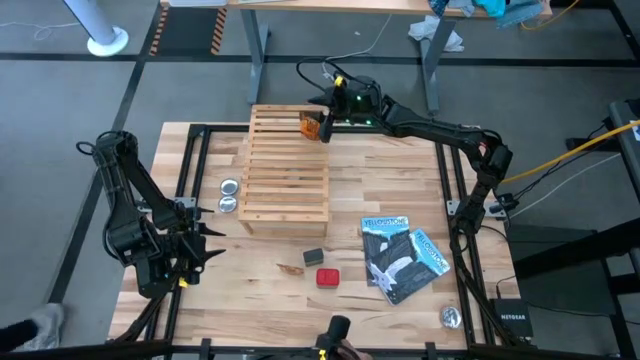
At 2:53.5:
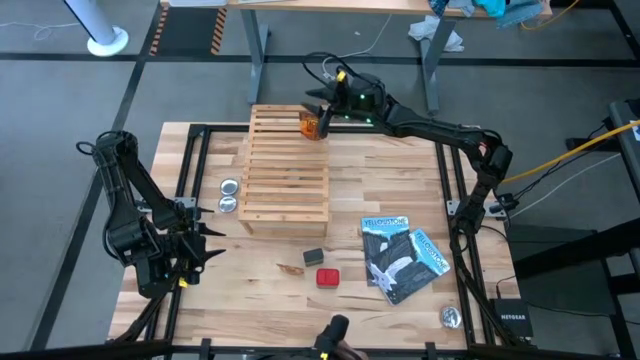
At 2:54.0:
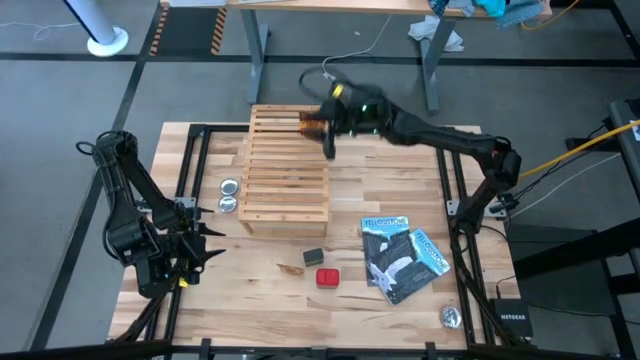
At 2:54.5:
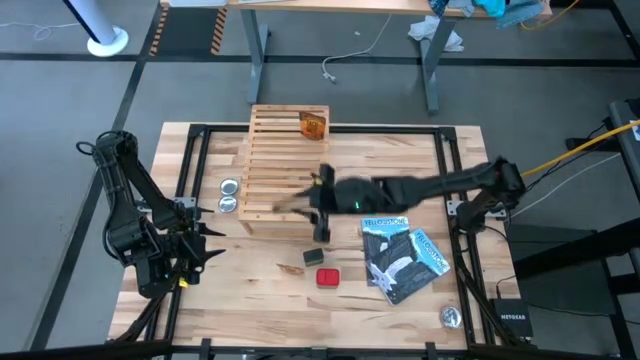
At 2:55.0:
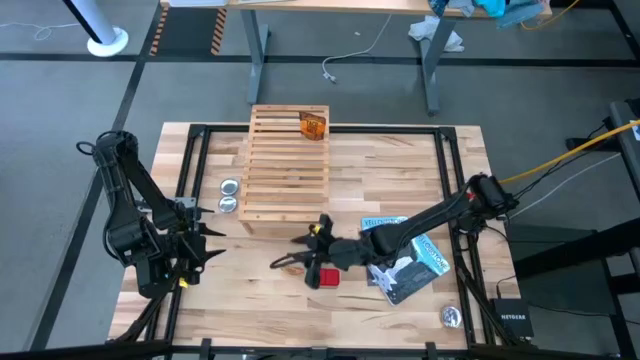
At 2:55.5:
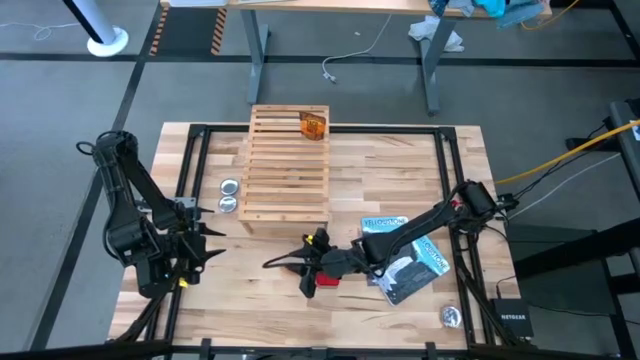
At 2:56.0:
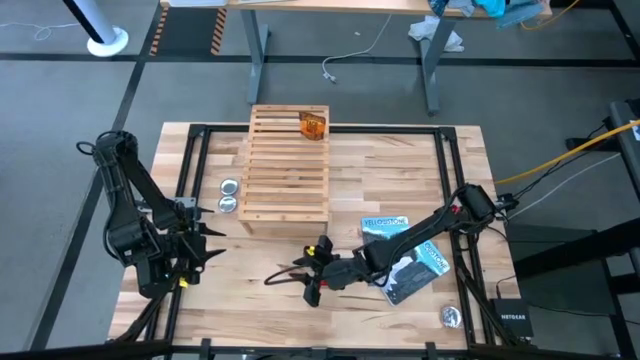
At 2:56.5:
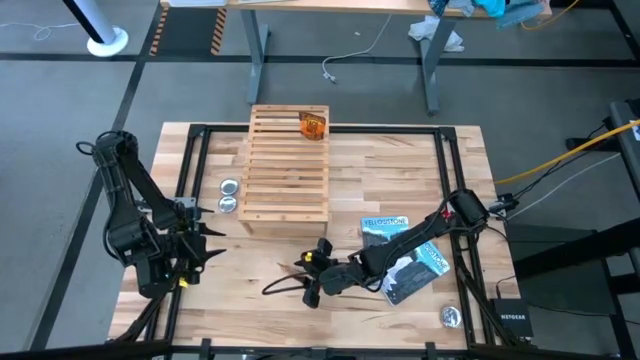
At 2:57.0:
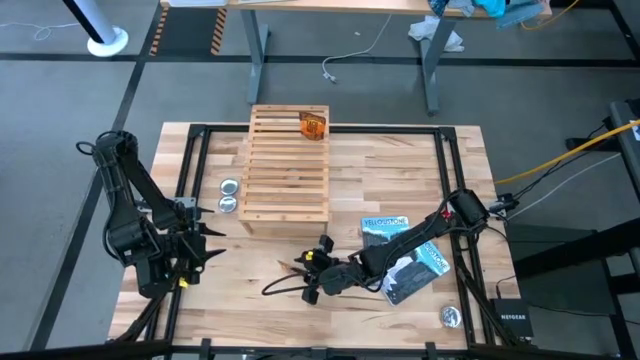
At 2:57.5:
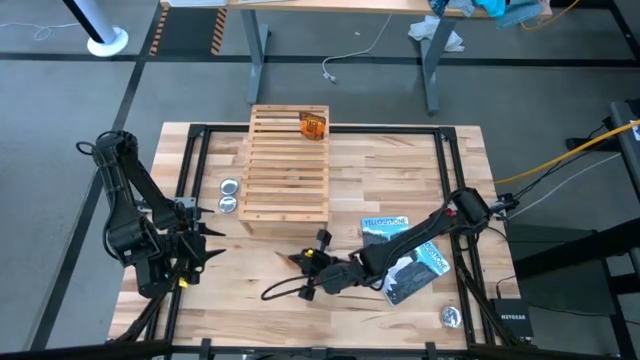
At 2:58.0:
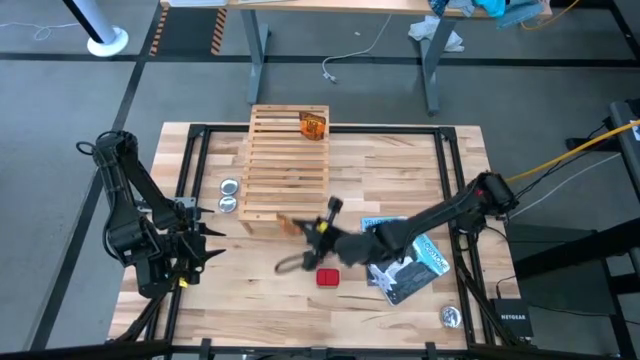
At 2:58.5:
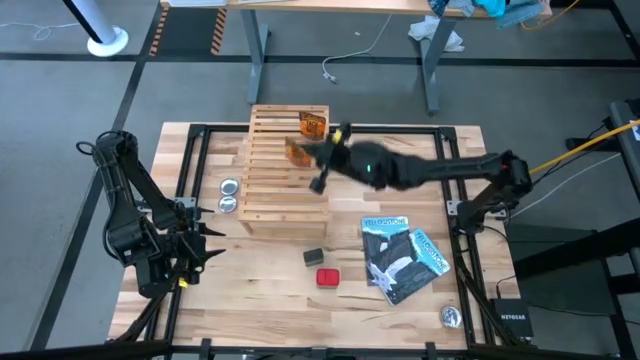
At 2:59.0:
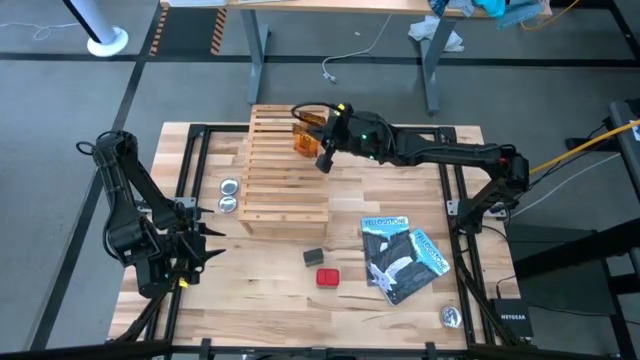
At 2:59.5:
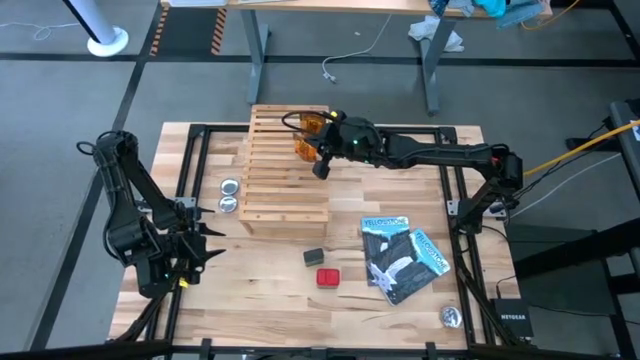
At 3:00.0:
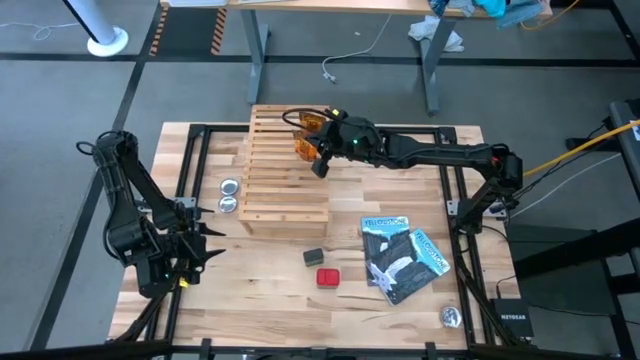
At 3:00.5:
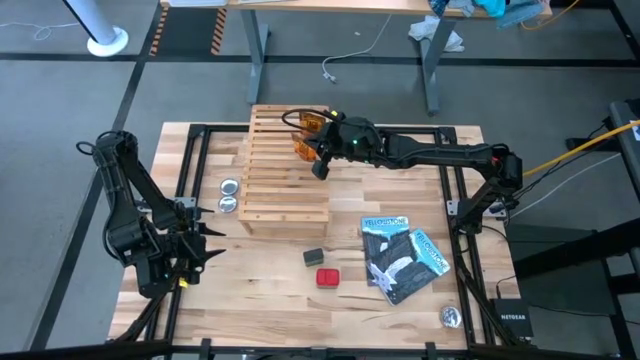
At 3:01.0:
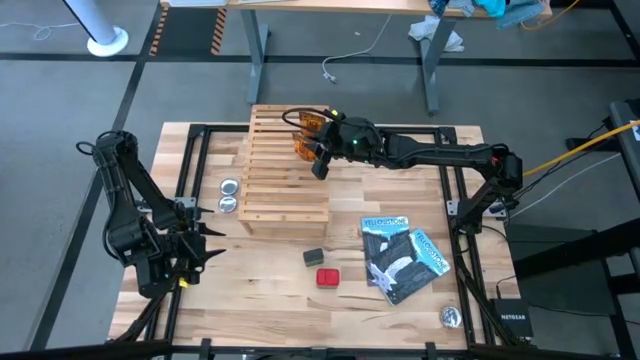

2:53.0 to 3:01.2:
Task: Shelf spices
Put the orange seasoning pack on the shelf

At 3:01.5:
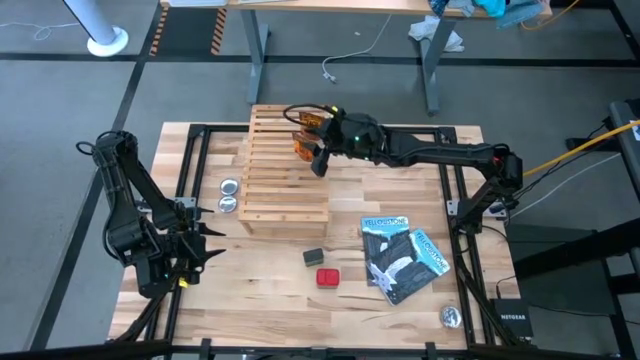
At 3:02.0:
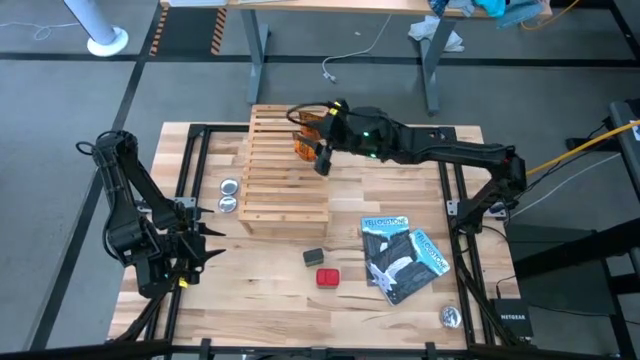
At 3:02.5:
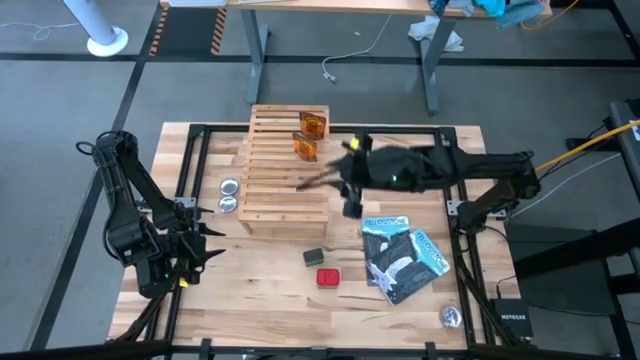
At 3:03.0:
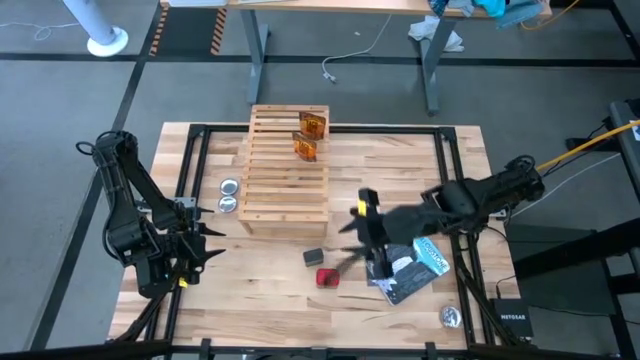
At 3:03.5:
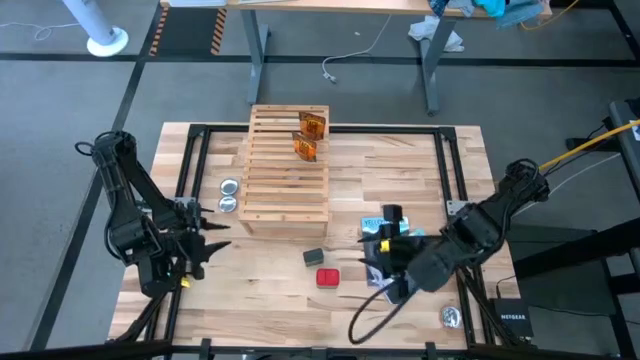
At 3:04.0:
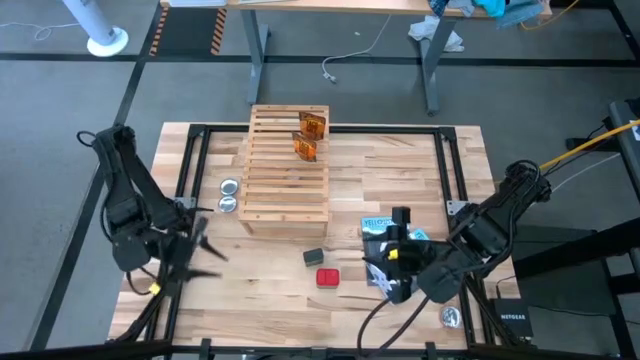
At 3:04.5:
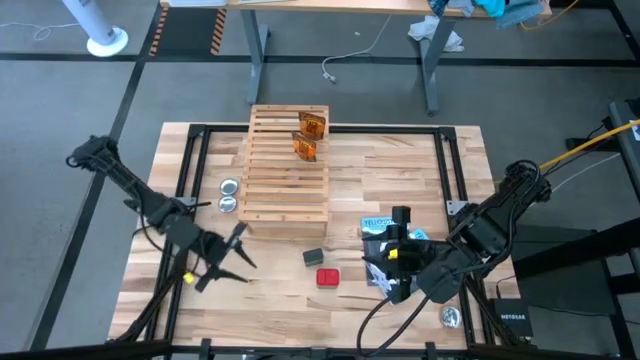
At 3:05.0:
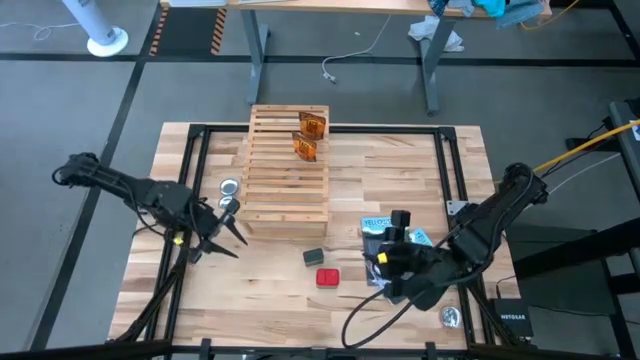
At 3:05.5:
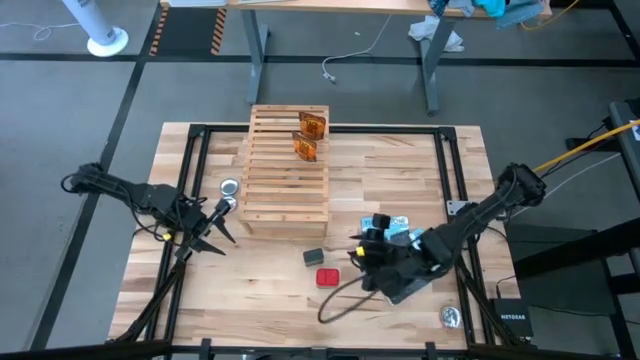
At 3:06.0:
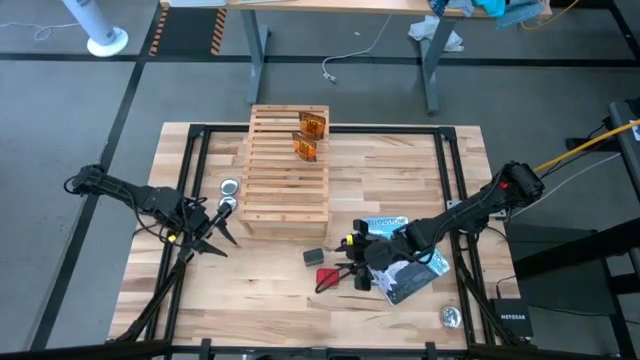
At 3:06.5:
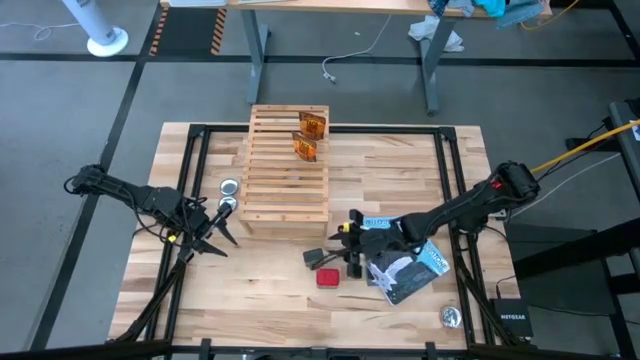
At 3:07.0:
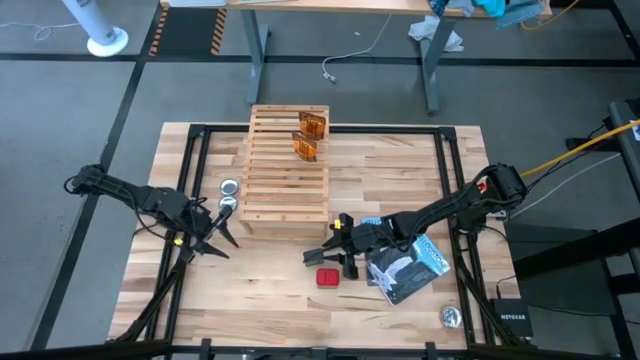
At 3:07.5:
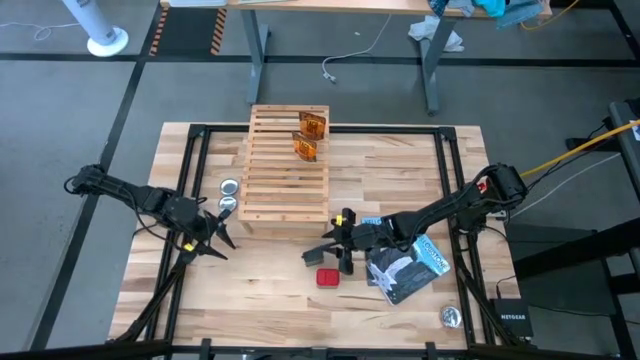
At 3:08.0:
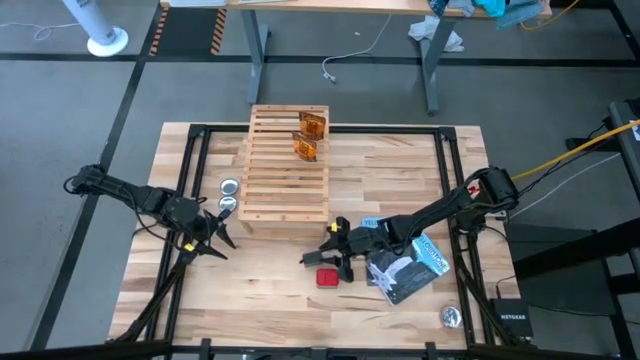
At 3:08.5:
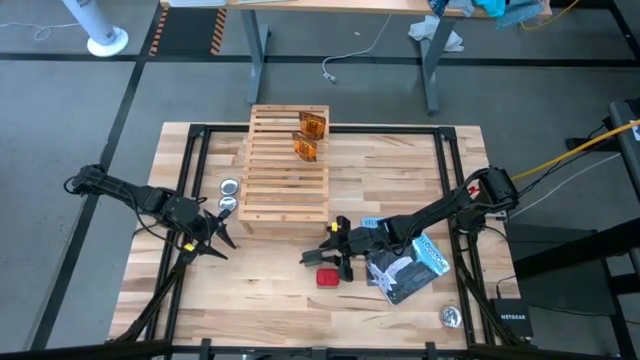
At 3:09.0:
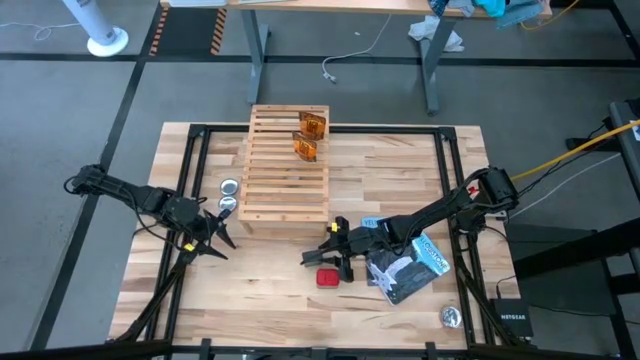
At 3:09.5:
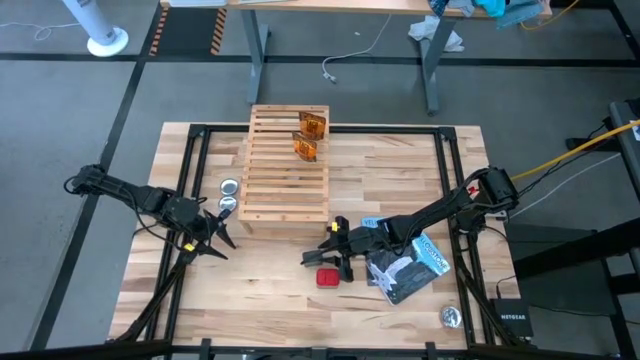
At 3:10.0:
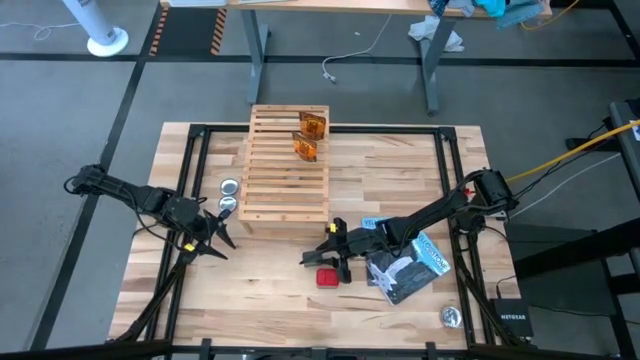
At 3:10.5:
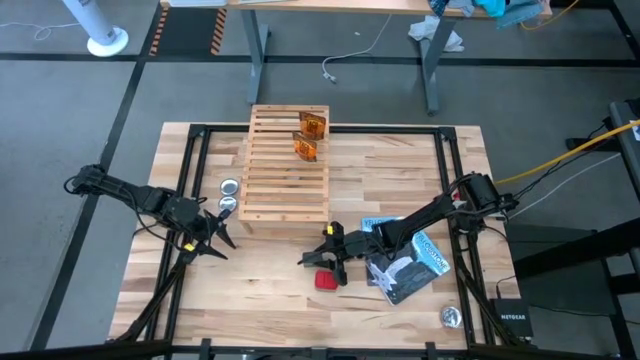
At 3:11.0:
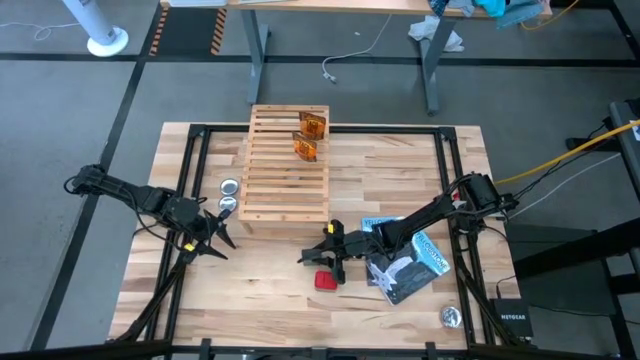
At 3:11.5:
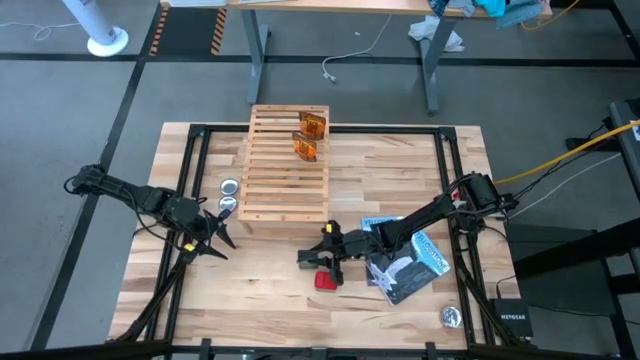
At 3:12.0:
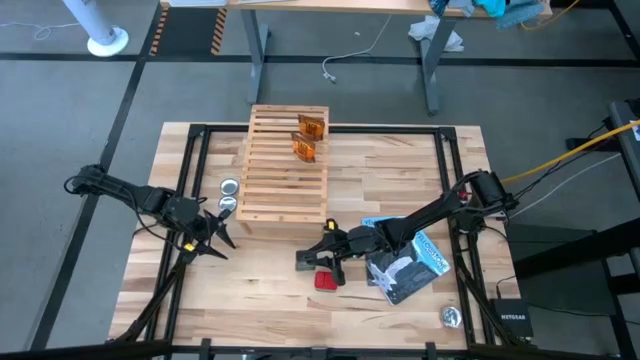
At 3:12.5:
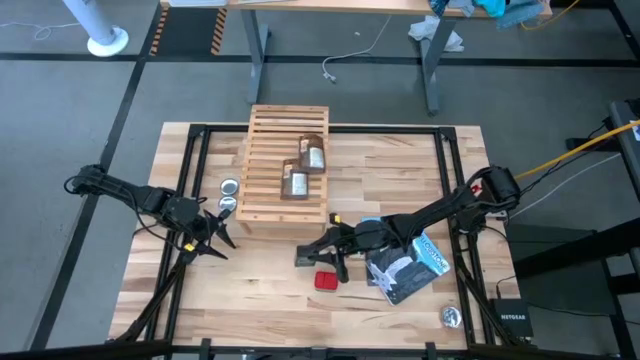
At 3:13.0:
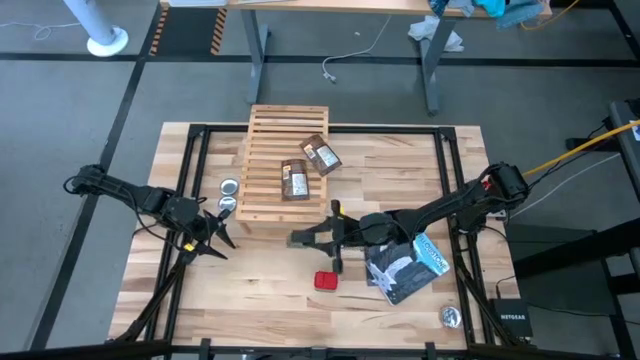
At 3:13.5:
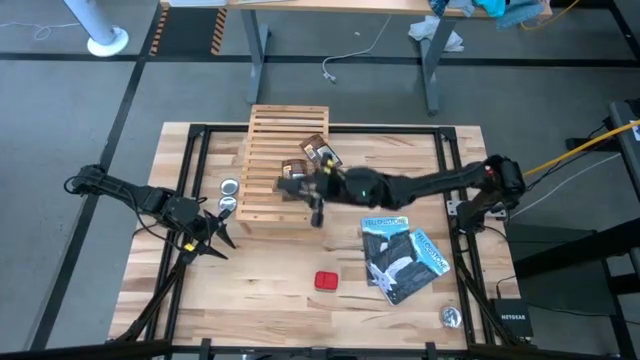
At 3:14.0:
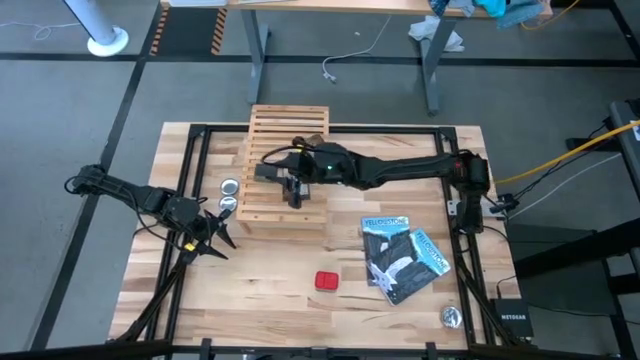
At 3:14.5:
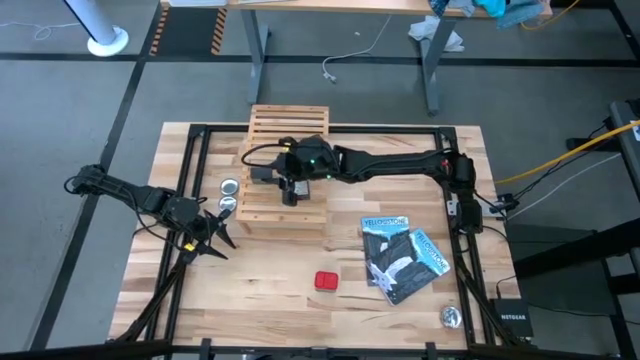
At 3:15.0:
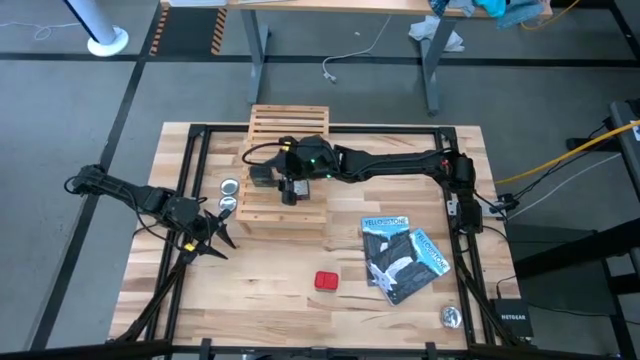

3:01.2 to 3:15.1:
Put the black seasoning can on the shelf

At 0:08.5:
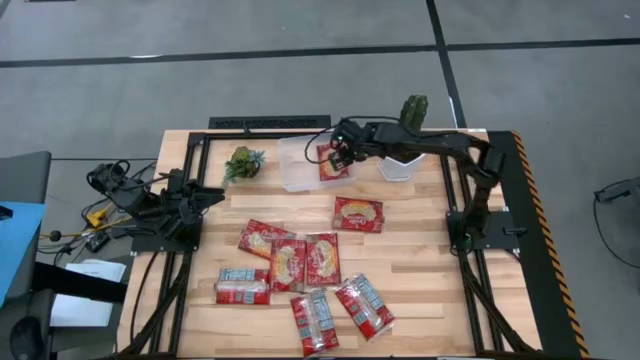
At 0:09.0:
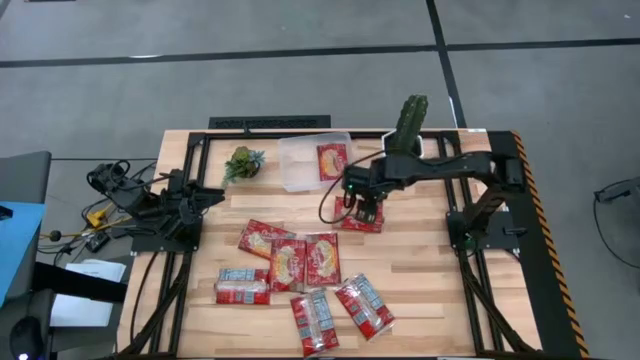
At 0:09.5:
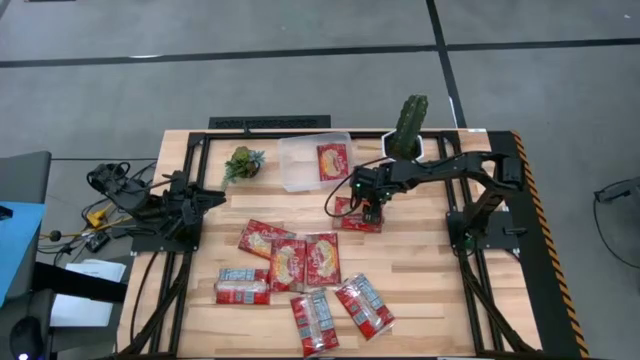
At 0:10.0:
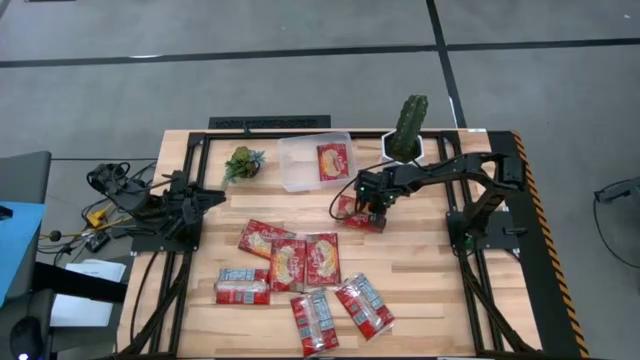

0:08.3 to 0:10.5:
Task: Sort popcorn bags into baskets
Put the red popcorn bag into the transparent bin
